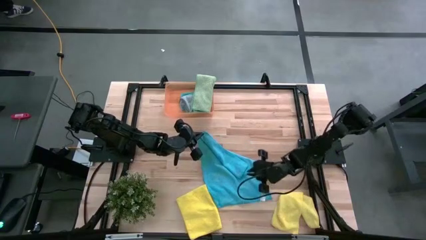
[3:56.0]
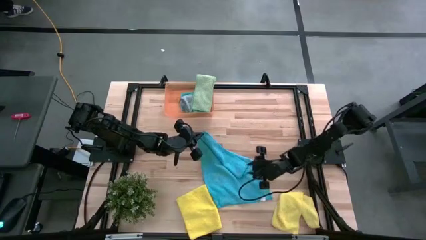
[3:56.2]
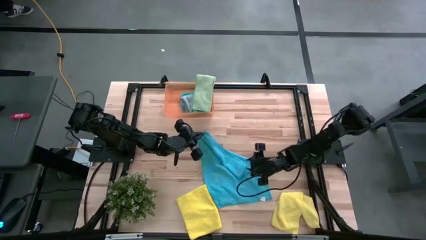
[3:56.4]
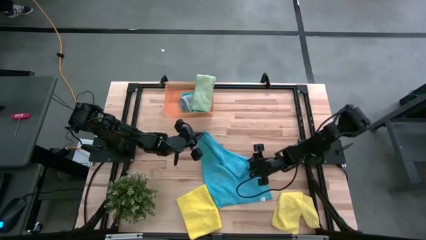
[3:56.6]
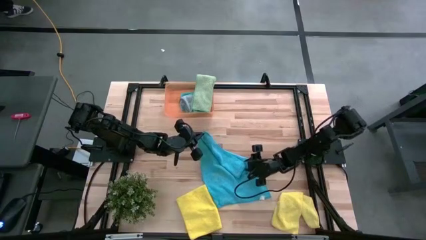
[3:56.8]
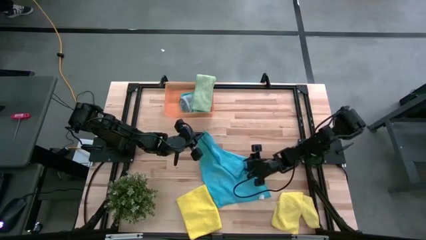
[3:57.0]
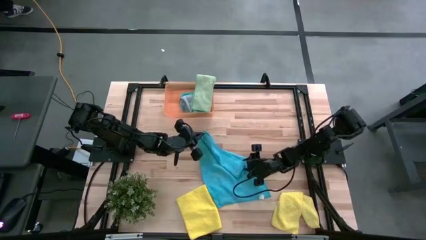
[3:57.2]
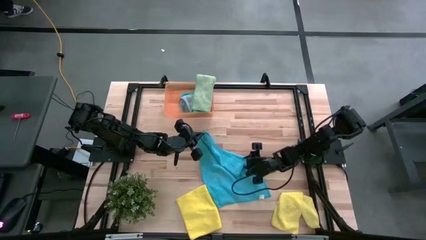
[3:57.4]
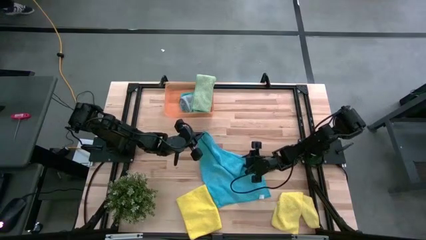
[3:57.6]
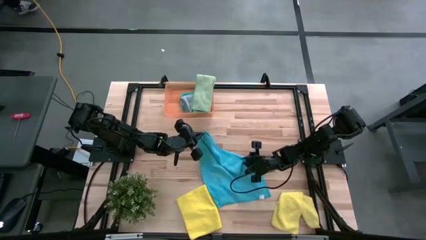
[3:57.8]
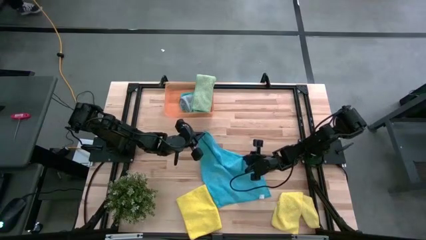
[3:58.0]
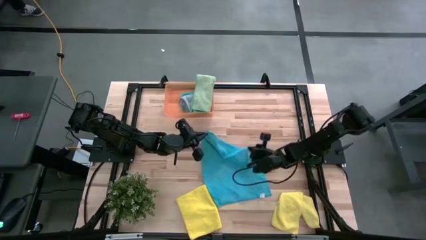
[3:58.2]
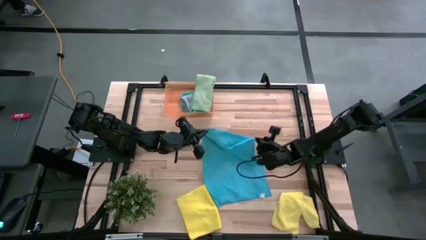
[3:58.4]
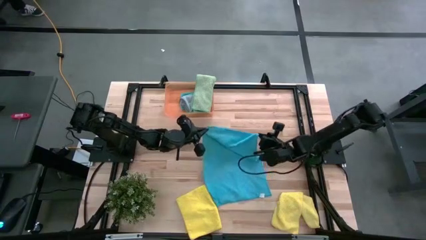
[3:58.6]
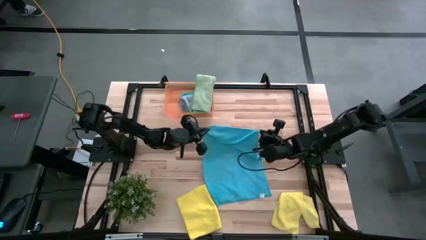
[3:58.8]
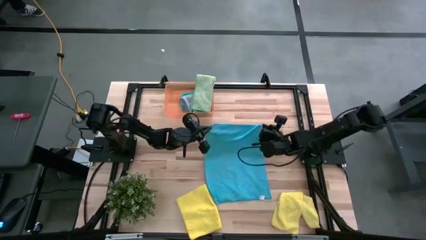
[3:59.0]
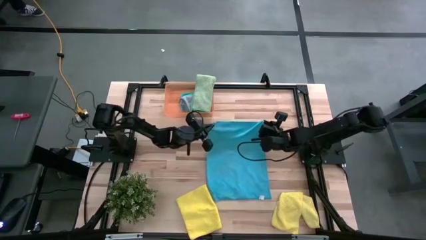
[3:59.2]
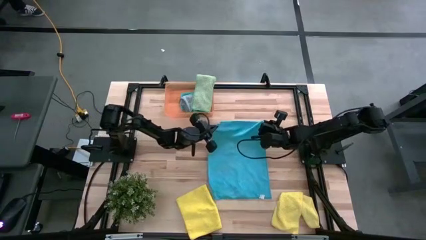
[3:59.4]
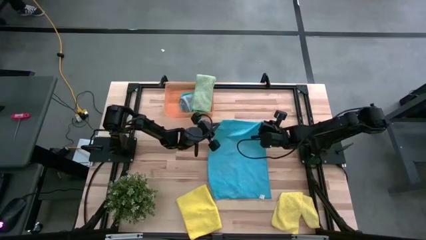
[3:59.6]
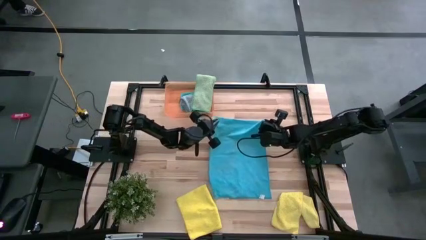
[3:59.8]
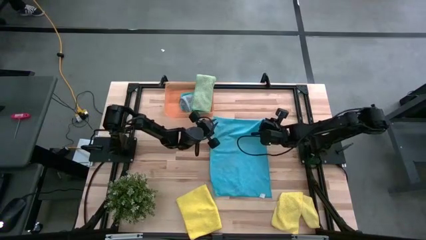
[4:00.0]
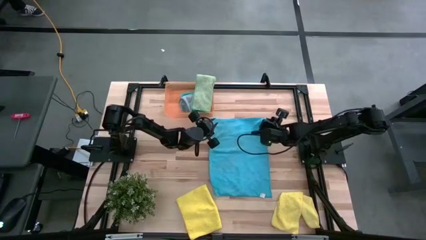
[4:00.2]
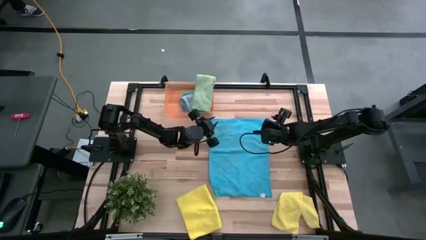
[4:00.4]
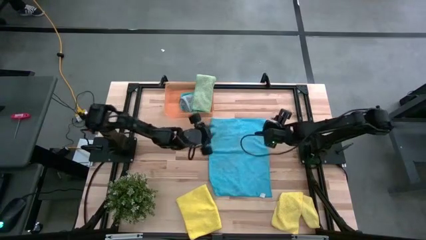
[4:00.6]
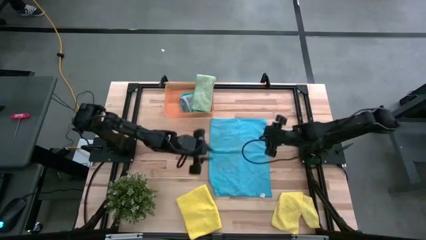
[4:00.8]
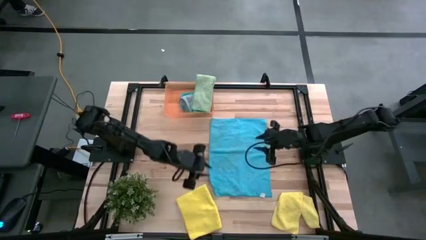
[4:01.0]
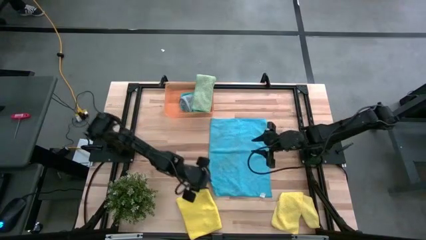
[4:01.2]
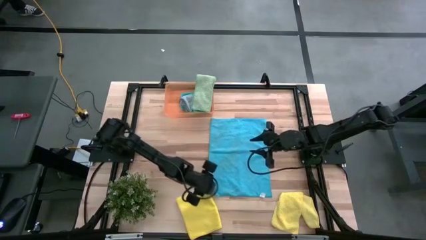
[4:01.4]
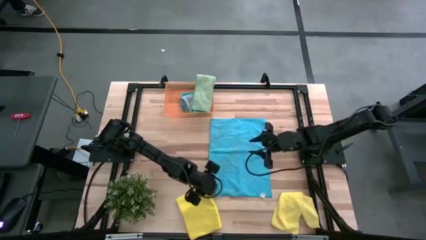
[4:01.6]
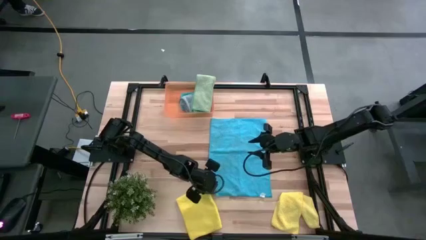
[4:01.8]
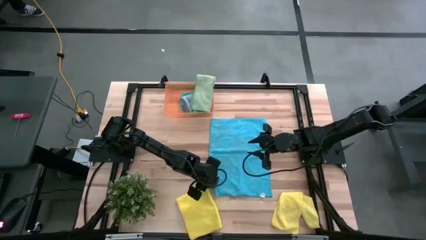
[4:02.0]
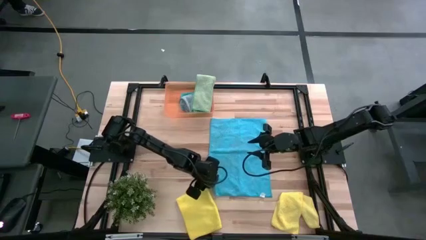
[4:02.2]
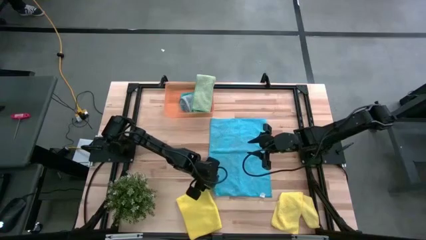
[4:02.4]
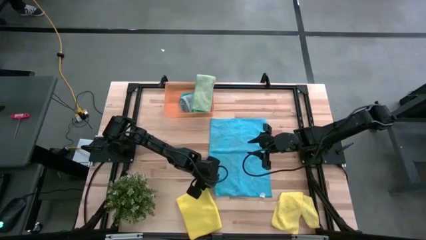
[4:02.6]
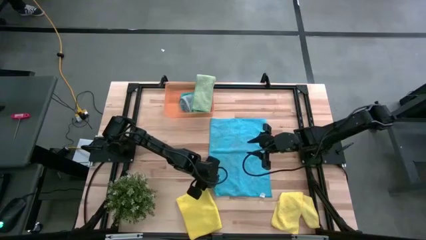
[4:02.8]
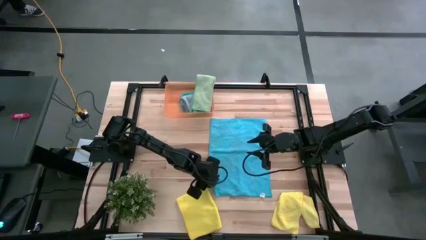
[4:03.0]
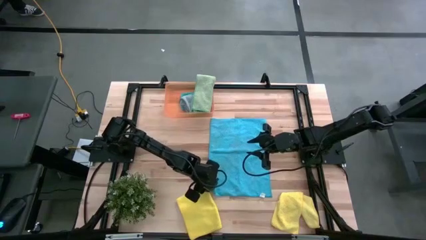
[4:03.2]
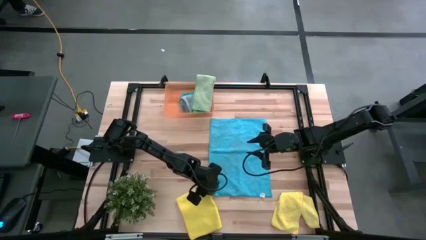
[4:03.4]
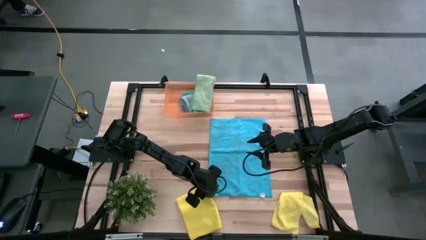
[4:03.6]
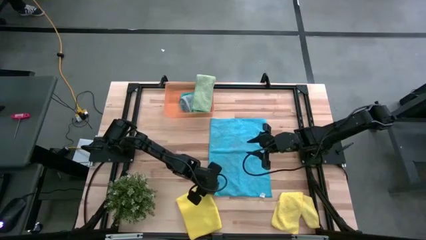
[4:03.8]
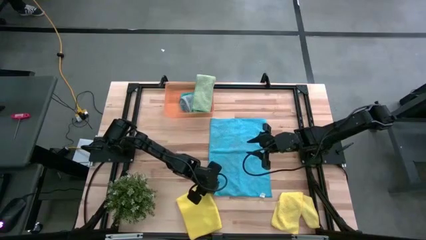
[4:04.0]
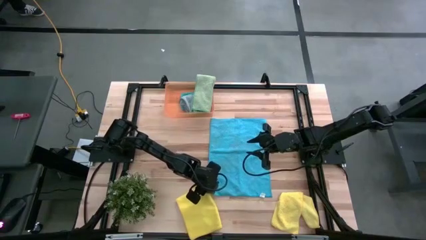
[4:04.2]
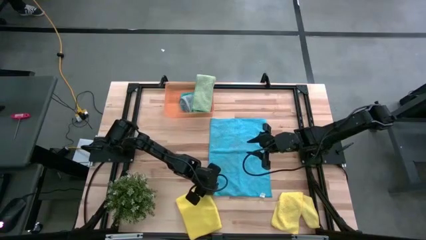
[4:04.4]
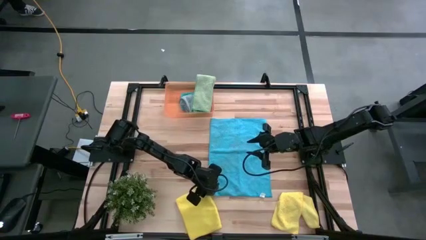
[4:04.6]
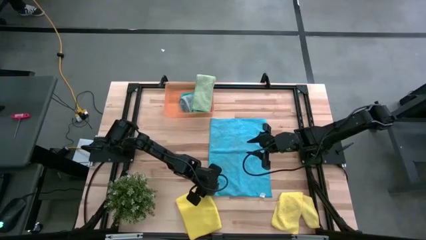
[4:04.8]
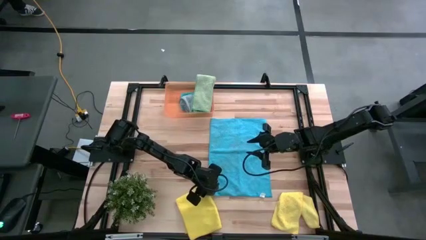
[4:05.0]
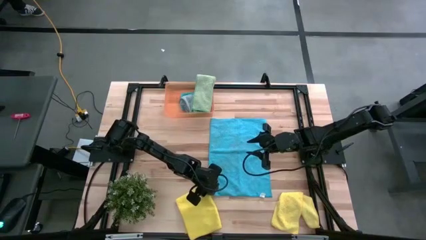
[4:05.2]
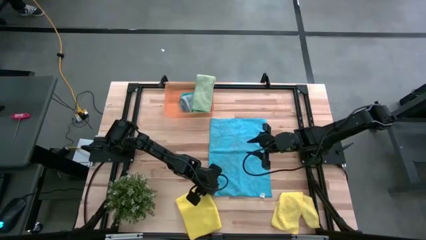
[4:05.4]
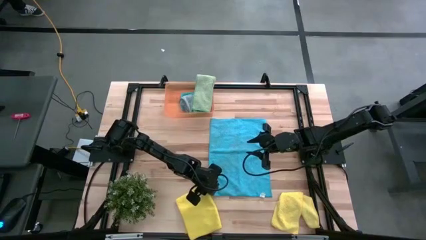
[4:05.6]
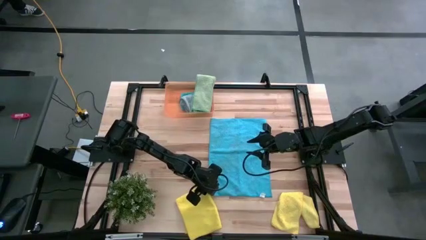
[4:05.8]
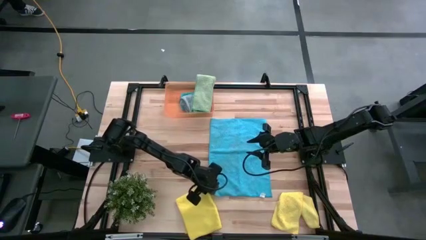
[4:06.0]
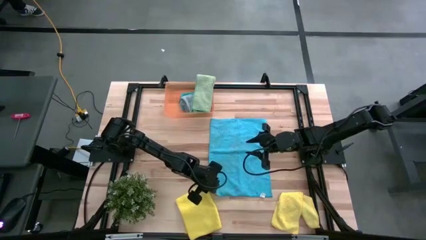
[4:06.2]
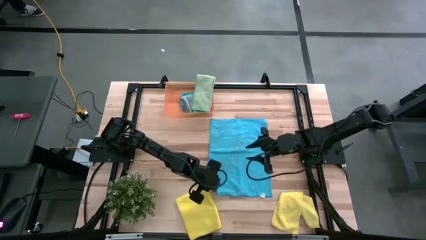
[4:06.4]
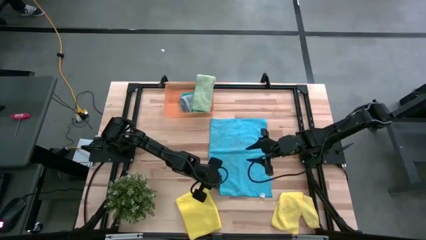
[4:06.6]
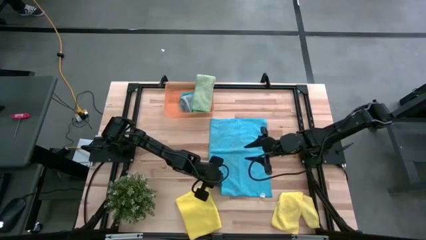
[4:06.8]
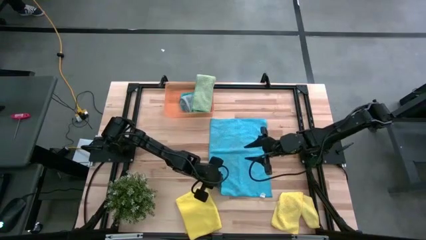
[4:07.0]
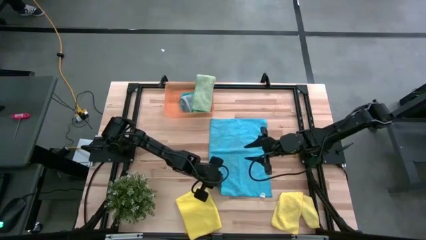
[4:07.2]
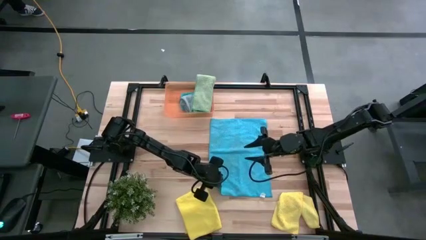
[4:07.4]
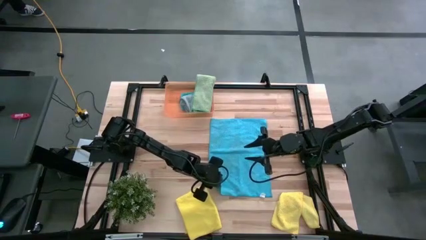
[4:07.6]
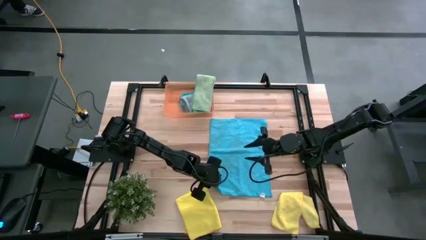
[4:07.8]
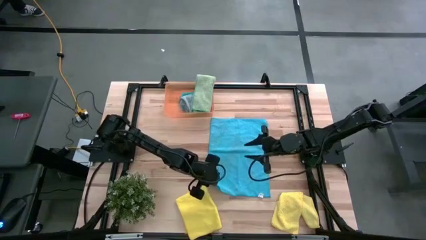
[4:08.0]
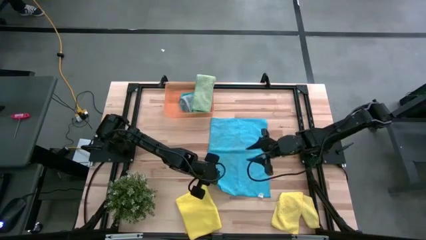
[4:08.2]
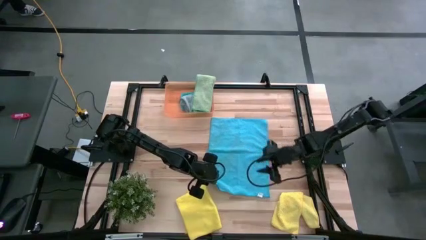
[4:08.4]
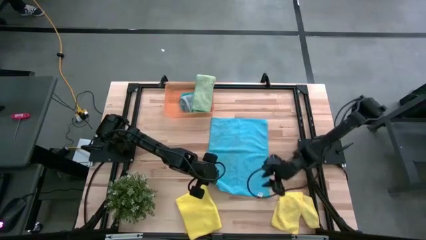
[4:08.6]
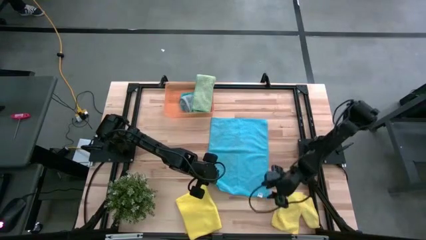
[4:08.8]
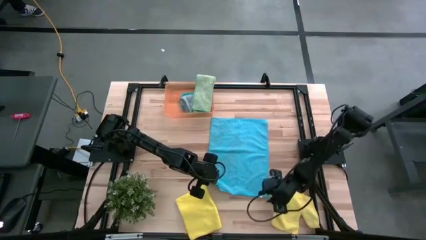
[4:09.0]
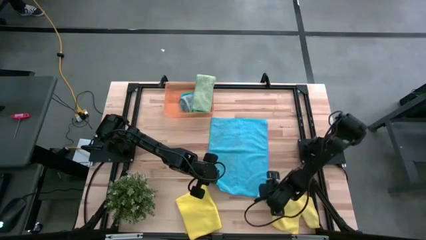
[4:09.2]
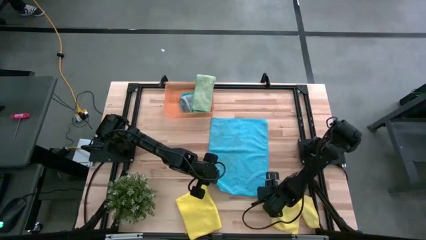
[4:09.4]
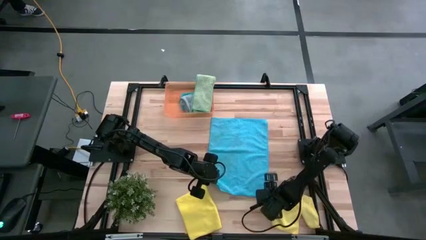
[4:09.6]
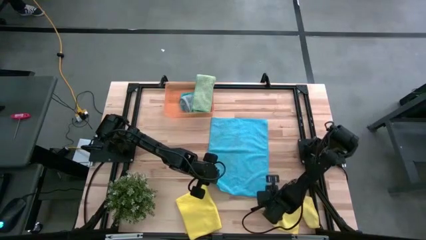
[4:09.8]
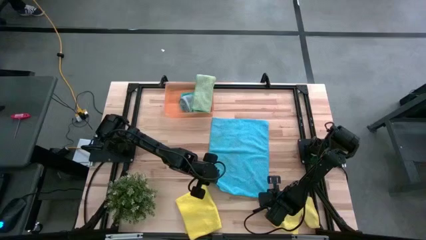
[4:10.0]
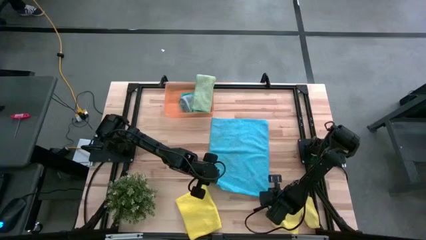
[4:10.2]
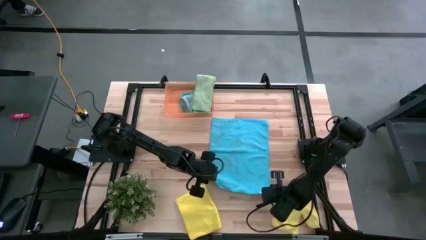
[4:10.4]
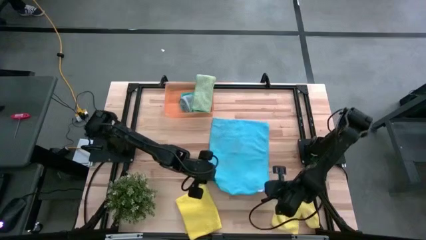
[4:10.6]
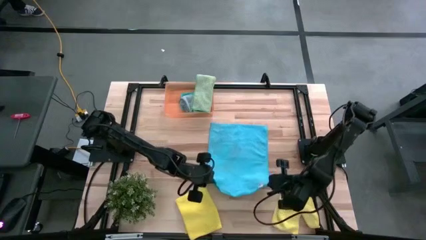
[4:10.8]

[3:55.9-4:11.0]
Task: Fold microfiber towels
Fold the blue microfiber cloth on the table
